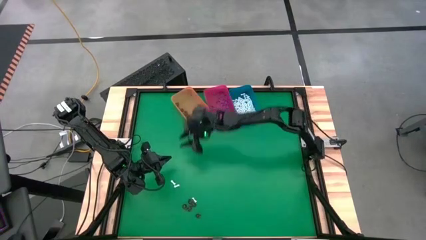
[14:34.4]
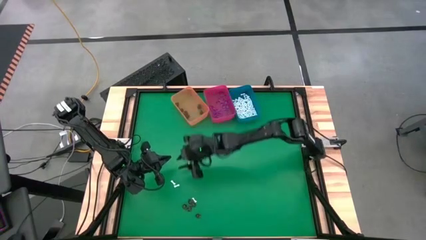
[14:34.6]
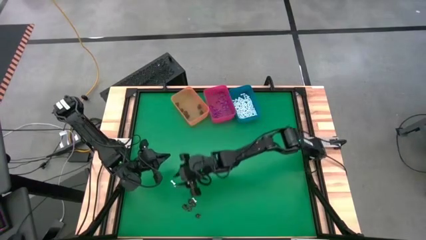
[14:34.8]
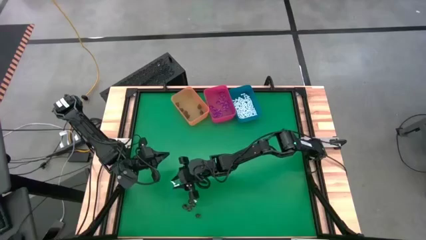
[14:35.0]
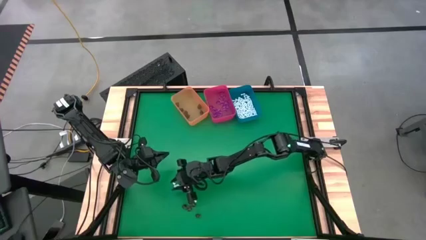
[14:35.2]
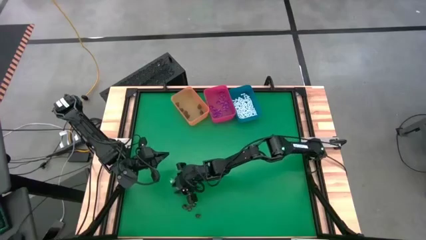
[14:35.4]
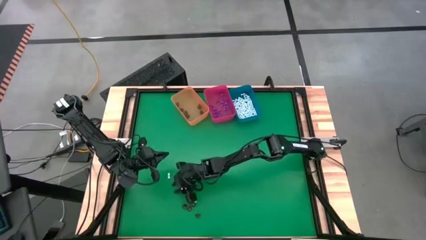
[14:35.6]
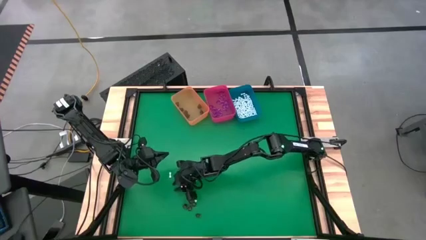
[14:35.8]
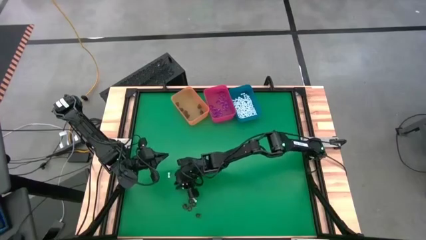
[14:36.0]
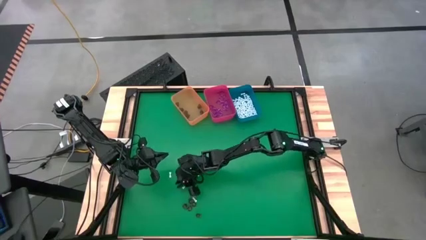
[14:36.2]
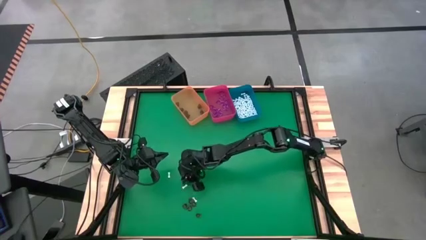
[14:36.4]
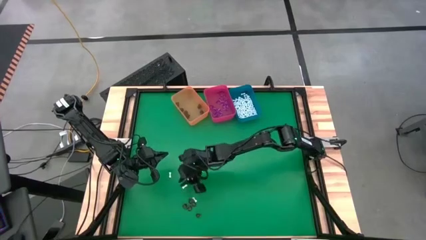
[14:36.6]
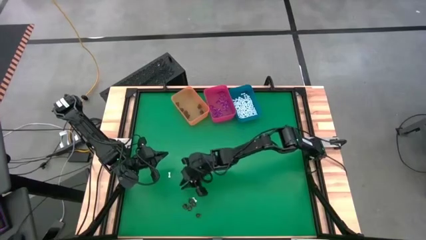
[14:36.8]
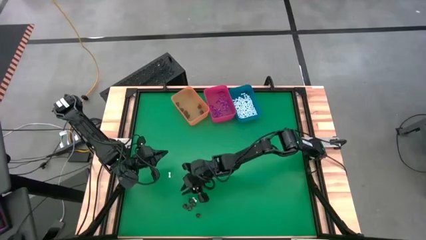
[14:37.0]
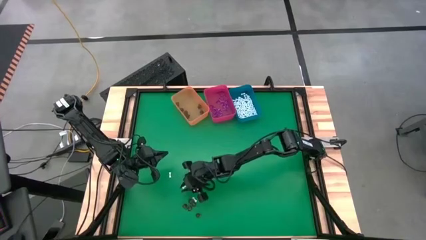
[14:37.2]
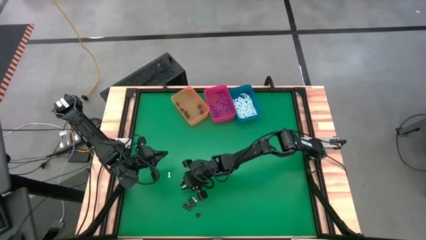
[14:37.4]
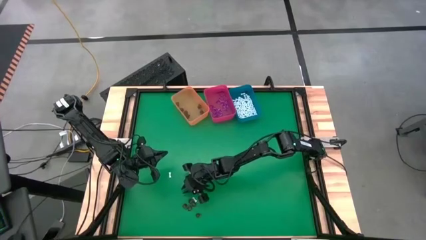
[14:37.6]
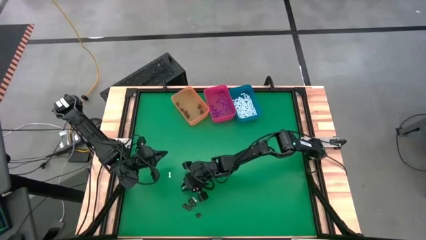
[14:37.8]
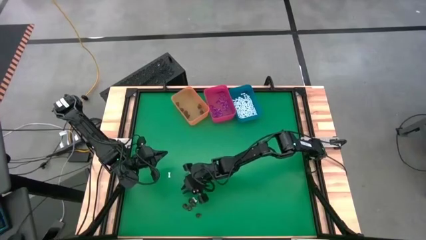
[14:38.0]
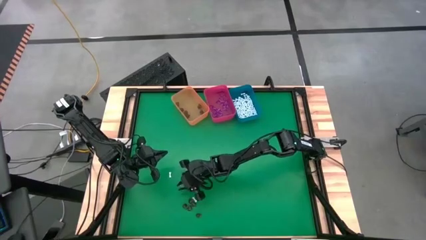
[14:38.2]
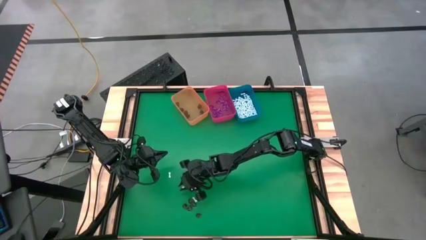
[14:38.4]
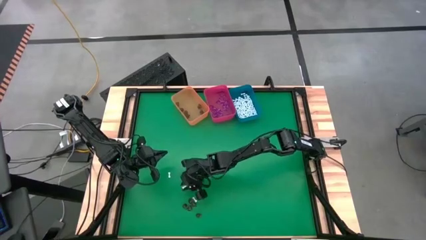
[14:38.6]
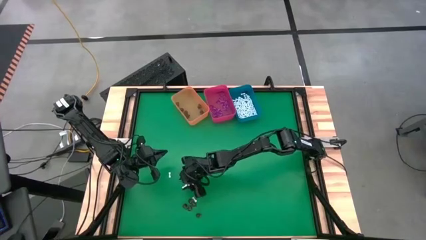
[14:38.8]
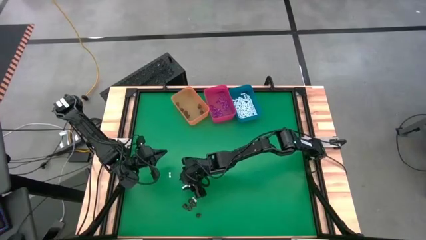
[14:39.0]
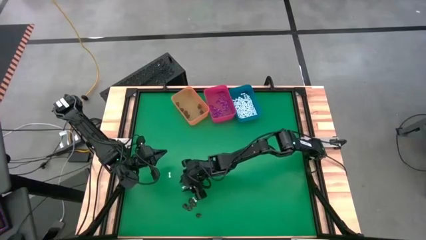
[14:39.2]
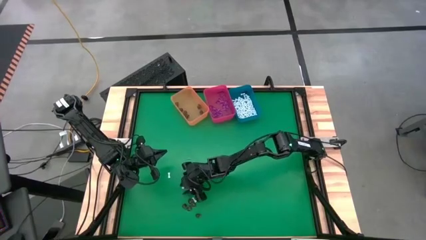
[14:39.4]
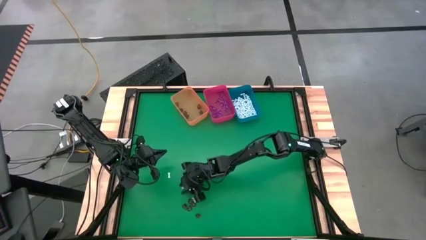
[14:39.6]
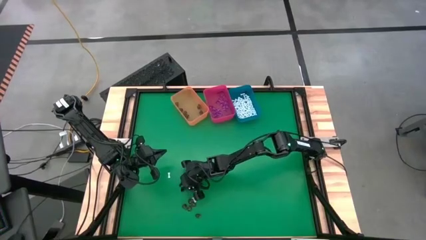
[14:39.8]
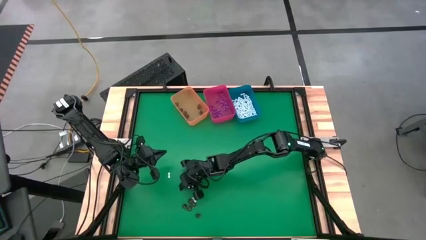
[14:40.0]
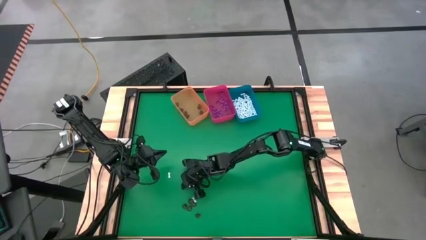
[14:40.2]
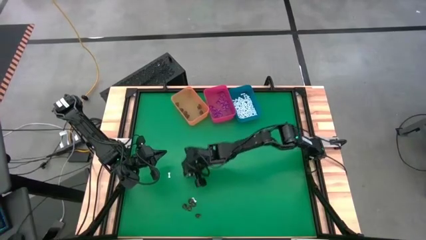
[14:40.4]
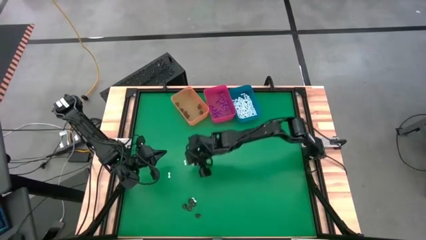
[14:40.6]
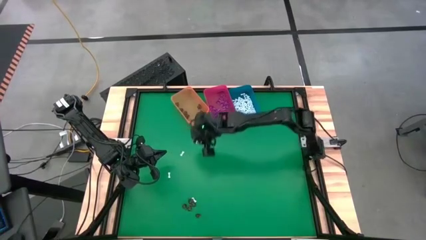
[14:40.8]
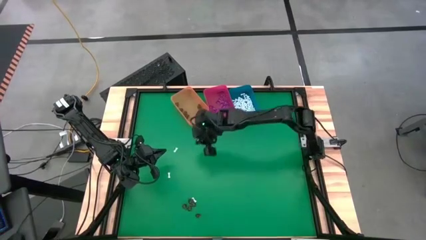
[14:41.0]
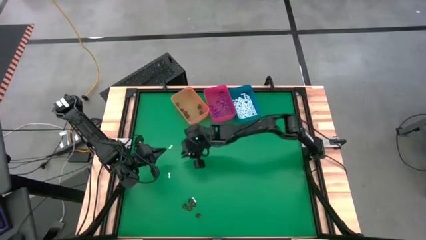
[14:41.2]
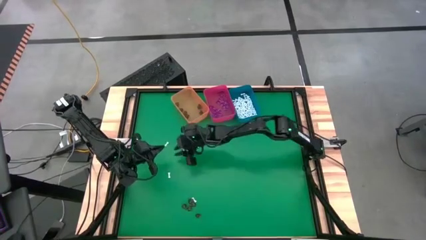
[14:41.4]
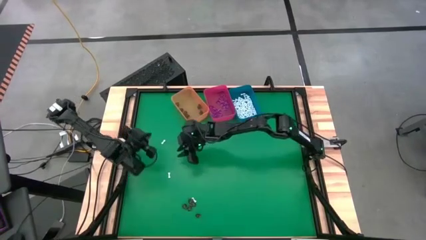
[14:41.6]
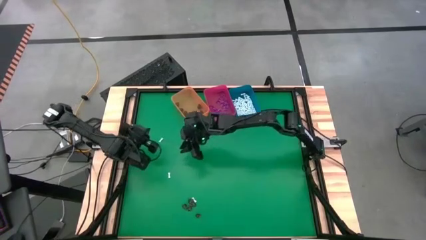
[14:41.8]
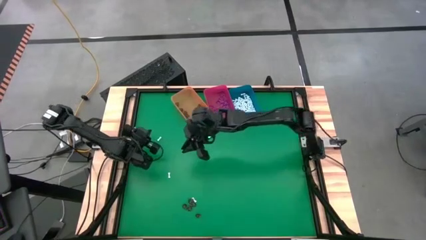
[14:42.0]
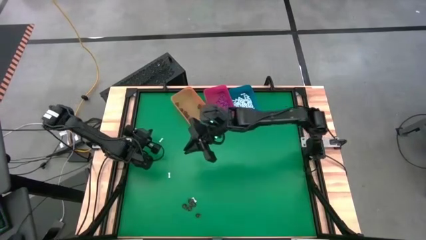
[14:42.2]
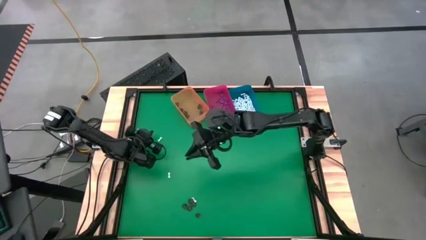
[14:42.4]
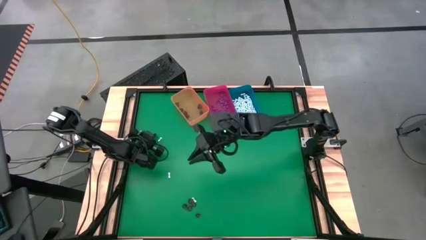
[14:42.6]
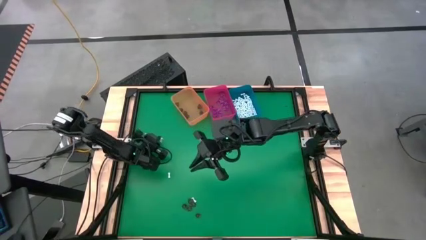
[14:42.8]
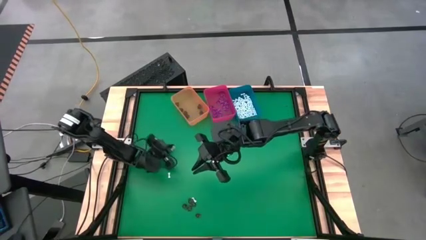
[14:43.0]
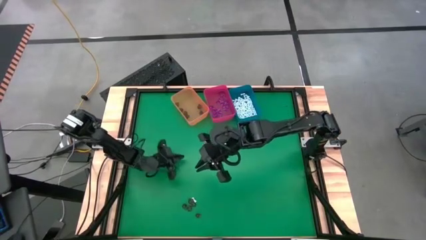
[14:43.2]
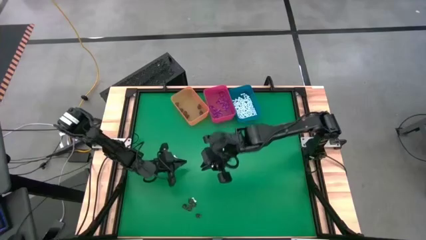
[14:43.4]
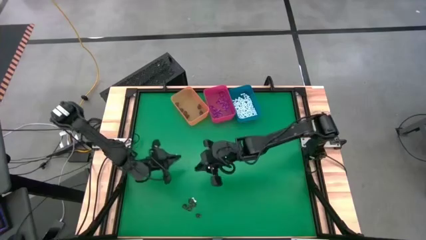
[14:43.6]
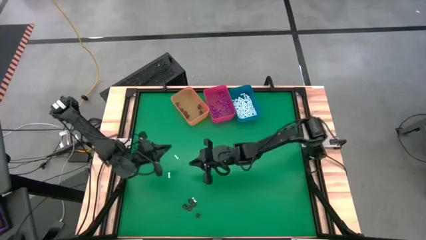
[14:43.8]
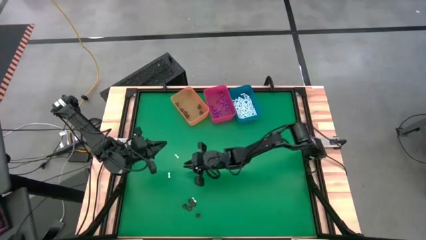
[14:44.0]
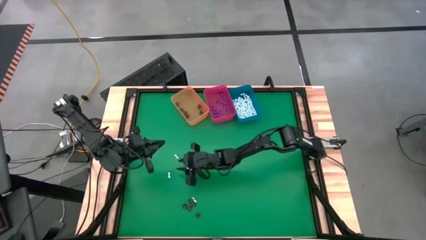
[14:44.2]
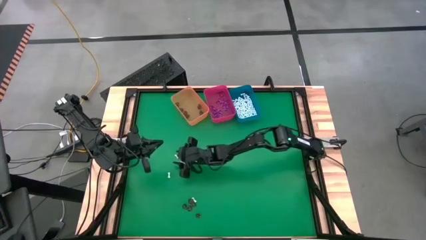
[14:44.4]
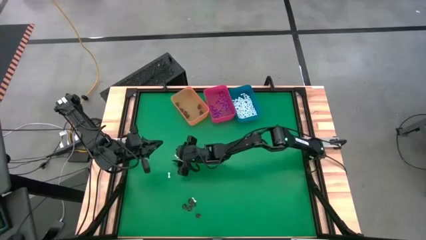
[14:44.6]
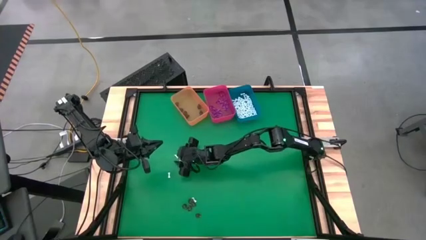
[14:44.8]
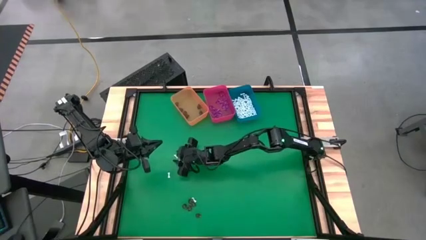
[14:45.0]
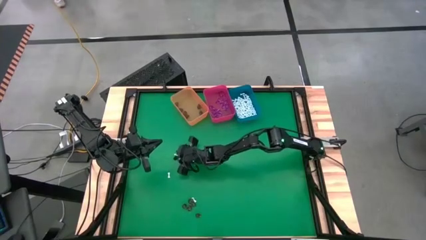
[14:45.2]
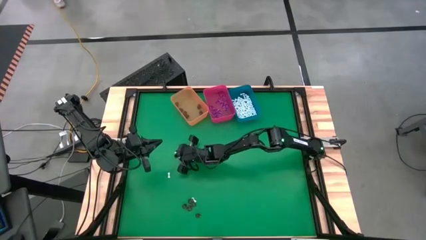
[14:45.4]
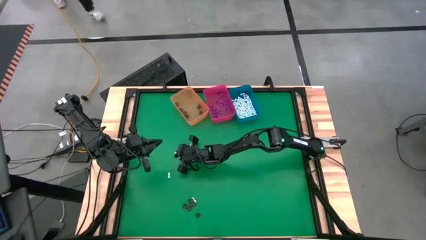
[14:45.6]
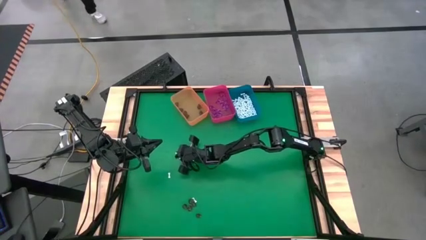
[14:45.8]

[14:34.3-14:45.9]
Task: Sort Halloween decoration
Put the white bone toy into the blue bin

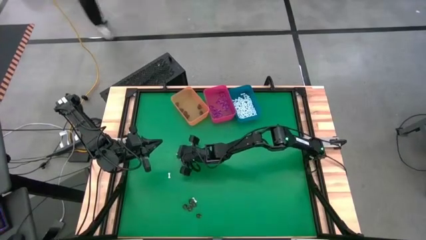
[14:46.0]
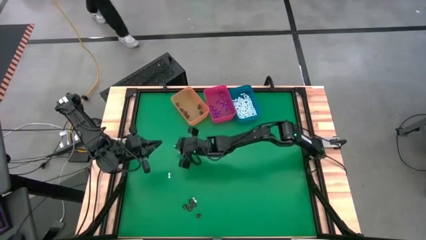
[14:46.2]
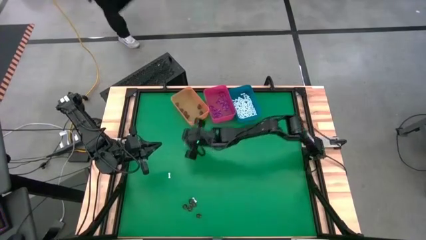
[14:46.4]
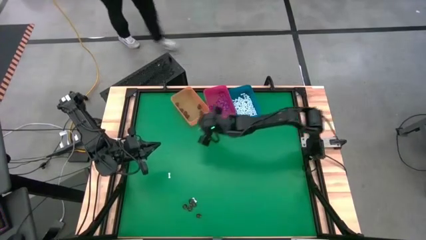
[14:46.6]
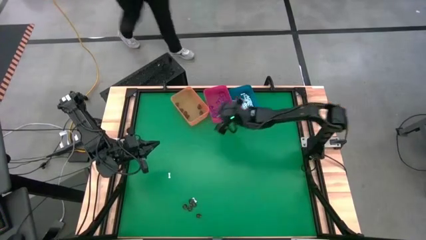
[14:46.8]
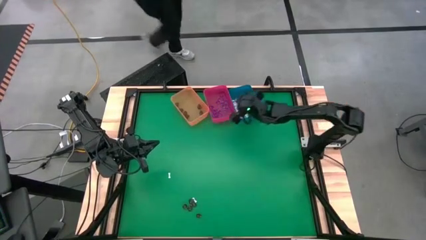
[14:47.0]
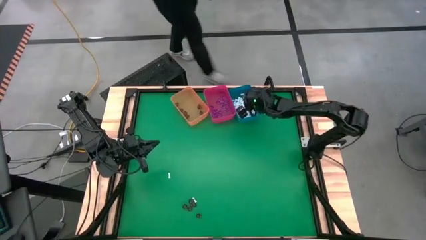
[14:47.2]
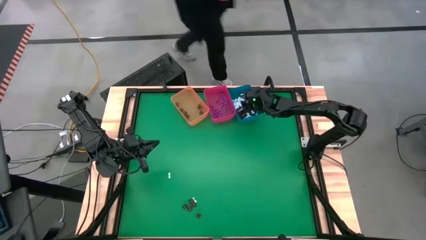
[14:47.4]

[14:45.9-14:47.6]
Put the top white bone toy into the blue bin

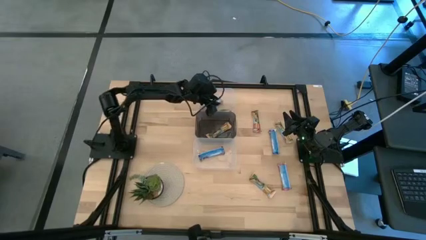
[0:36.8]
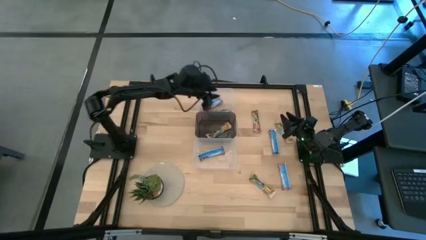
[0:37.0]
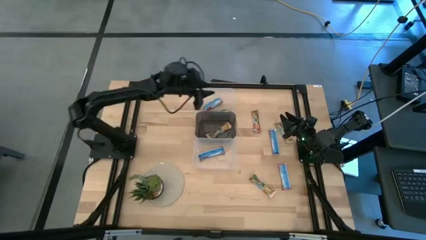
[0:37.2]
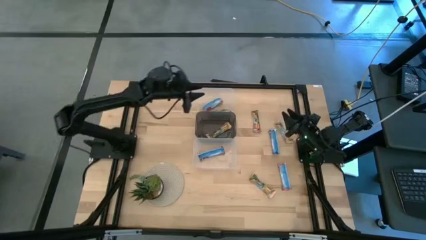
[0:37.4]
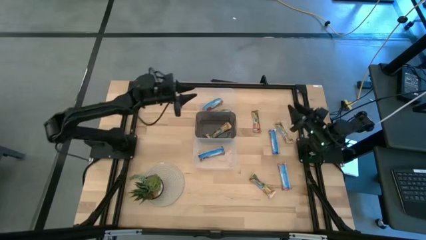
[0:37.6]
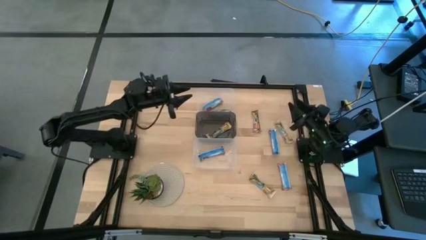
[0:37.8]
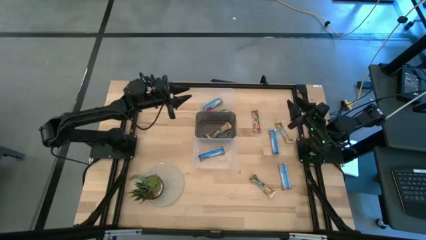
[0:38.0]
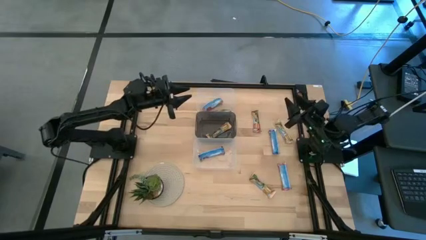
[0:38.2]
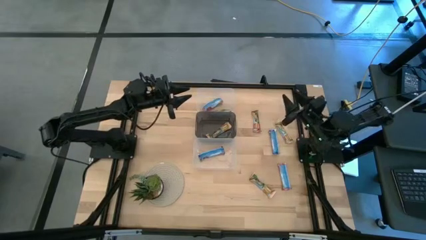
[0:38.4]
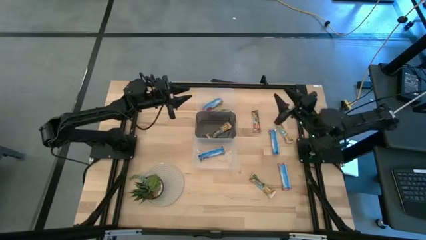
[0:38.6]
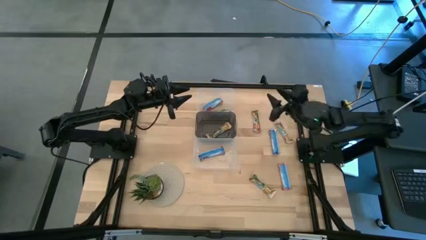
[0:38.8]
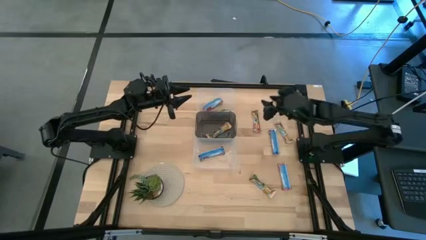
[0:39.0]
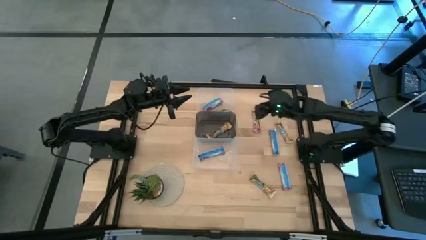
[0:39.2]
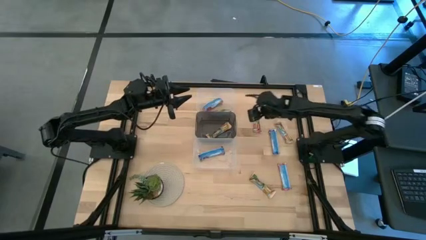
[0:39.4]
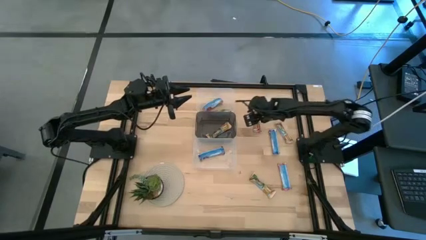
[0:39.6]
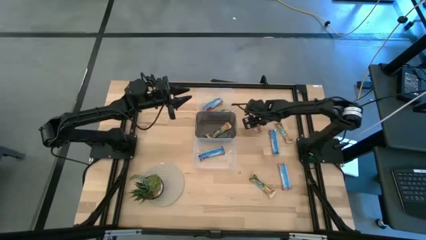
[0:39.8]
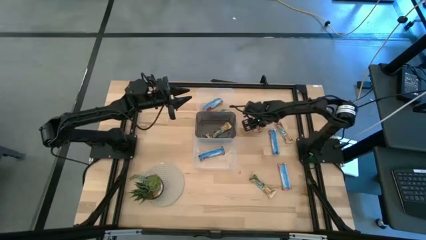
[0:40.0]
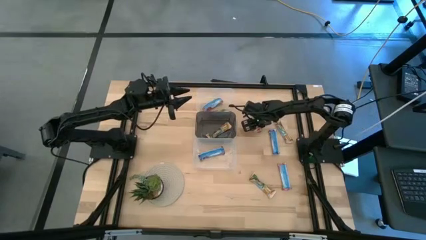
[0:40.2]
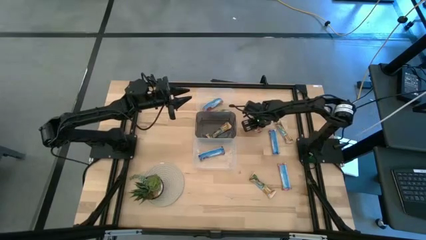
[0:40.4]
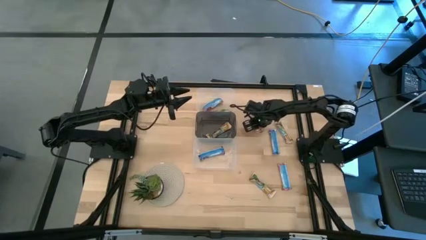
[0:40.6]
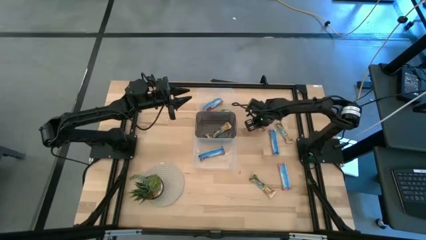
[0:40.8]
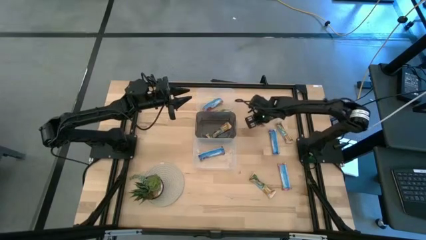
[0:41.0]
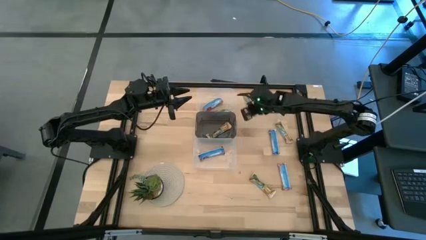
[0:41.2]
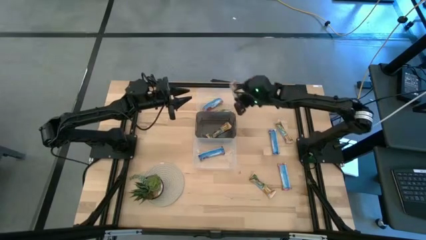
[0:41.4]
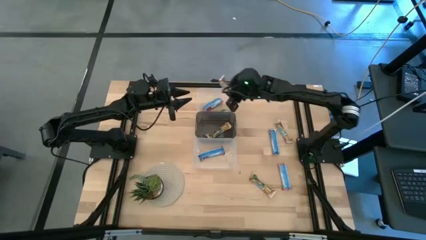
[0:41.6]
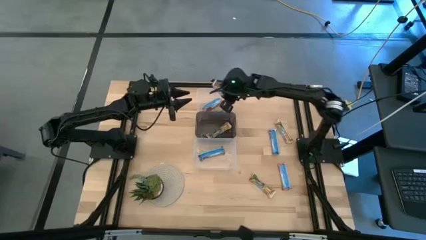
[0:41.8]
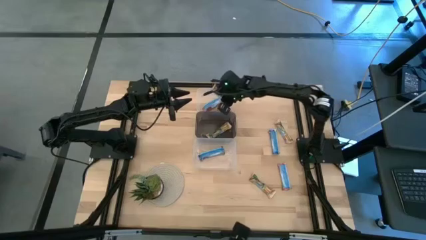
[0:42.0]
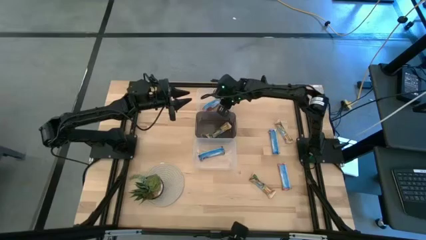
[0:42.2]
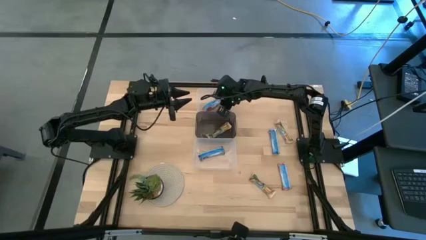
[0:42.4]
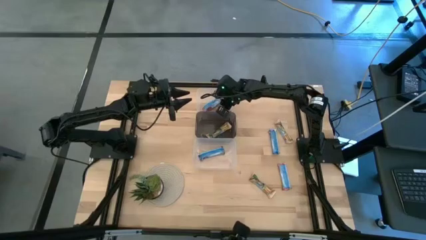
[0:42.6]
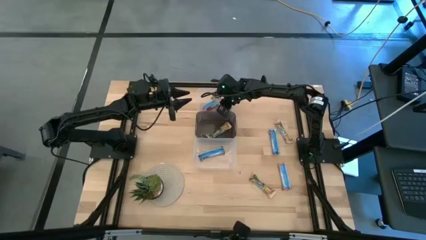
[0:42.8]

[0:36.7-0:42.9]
Task: Pick and place Granola Bars by type
Put the red granola bar into the top transparent bin
